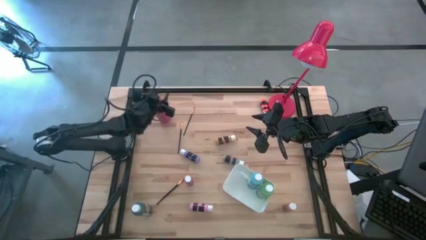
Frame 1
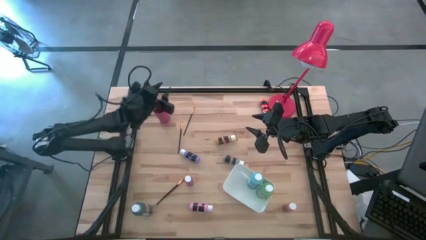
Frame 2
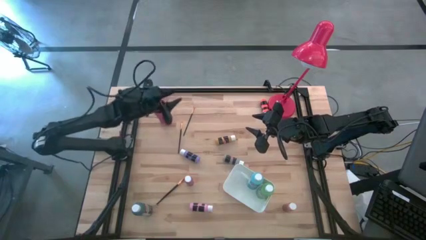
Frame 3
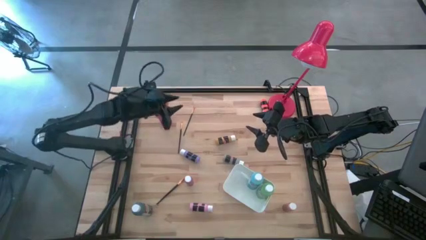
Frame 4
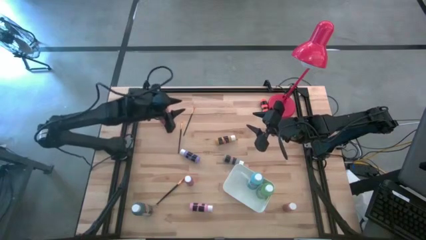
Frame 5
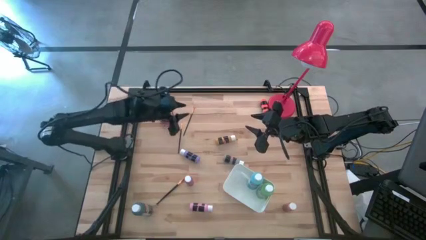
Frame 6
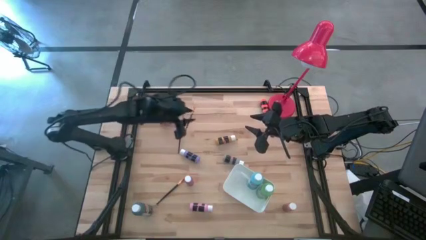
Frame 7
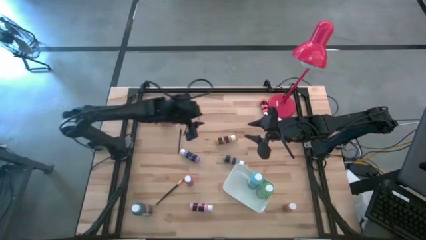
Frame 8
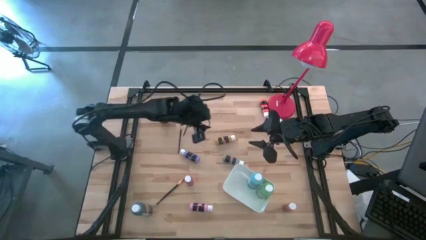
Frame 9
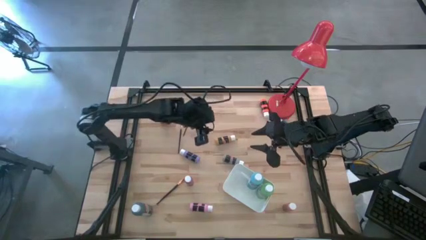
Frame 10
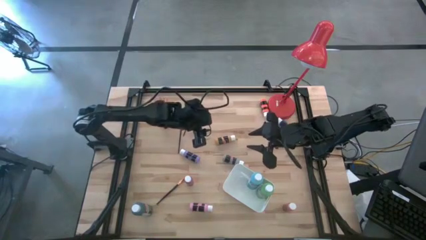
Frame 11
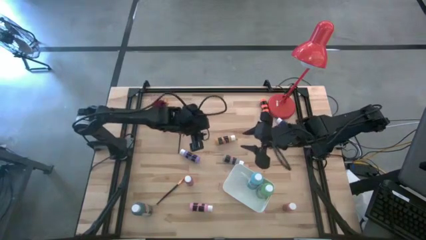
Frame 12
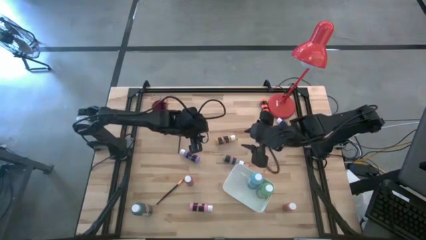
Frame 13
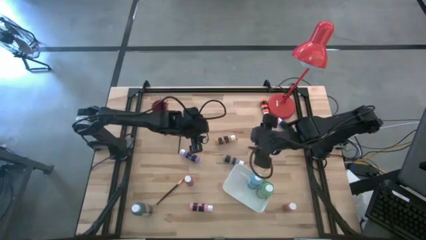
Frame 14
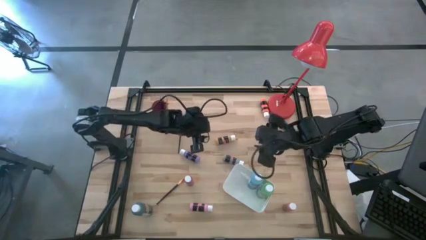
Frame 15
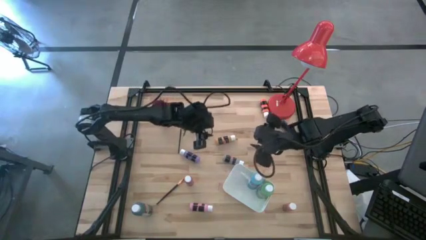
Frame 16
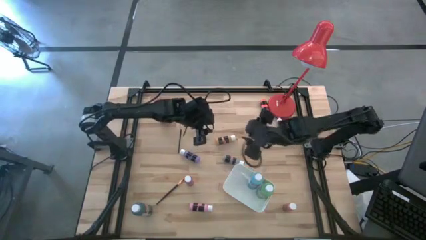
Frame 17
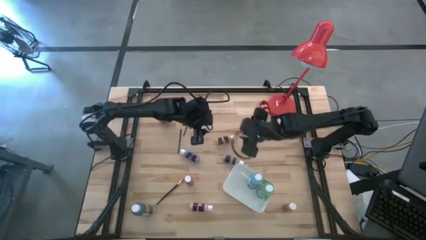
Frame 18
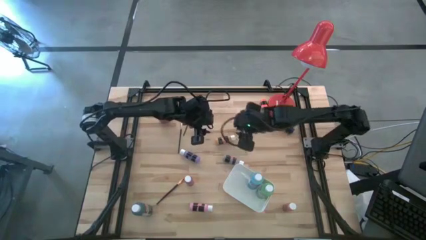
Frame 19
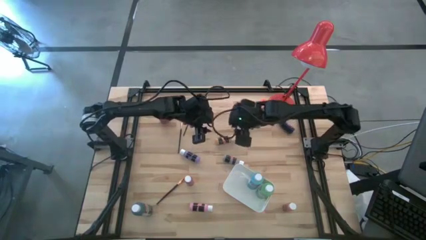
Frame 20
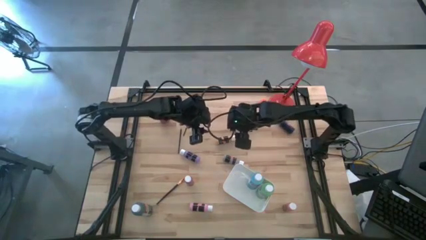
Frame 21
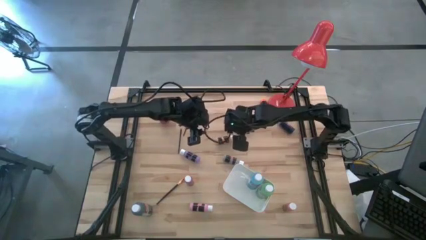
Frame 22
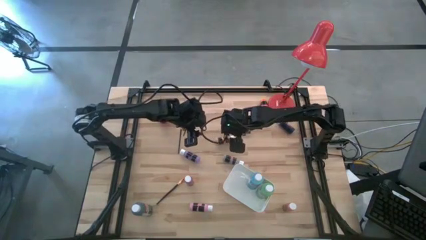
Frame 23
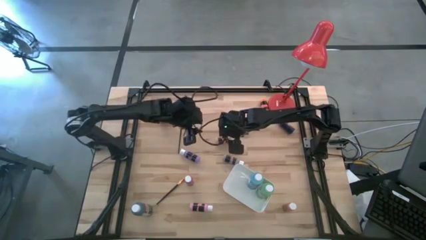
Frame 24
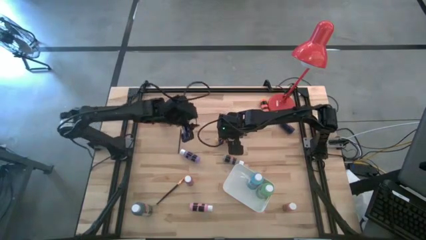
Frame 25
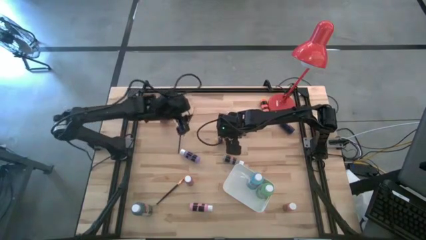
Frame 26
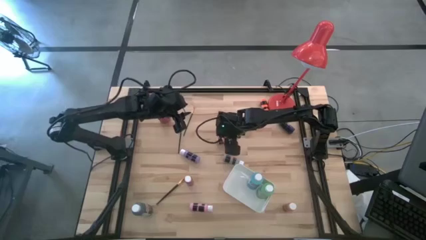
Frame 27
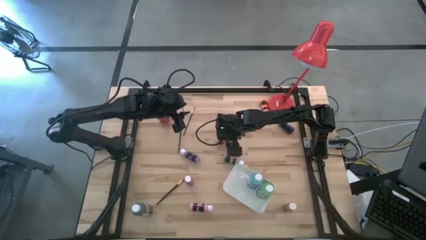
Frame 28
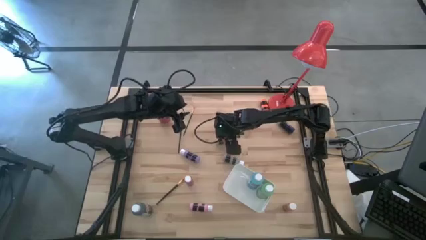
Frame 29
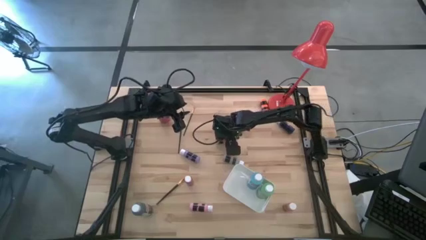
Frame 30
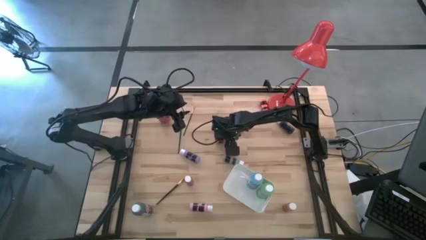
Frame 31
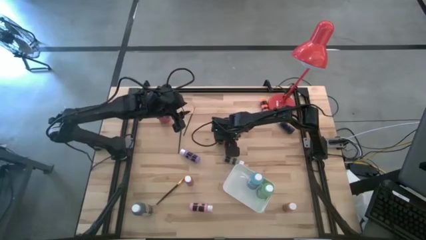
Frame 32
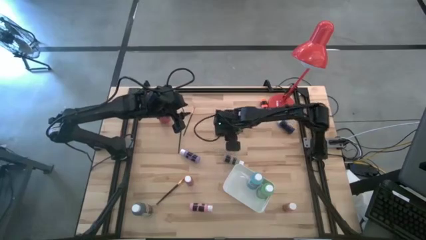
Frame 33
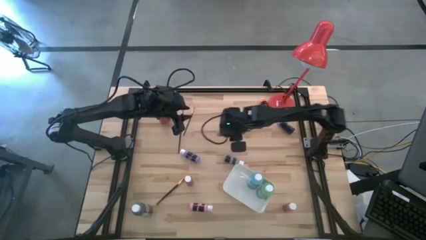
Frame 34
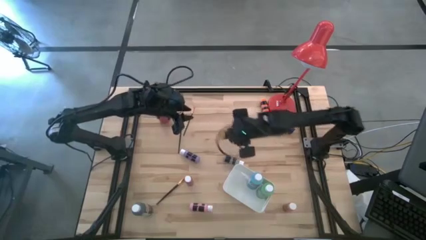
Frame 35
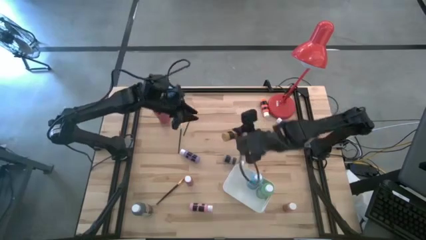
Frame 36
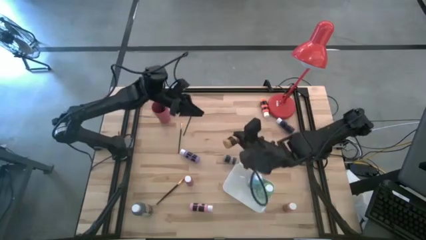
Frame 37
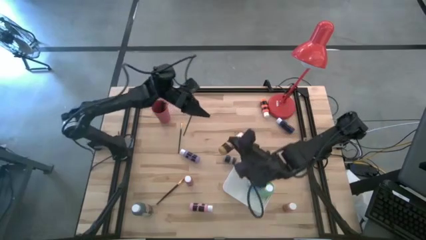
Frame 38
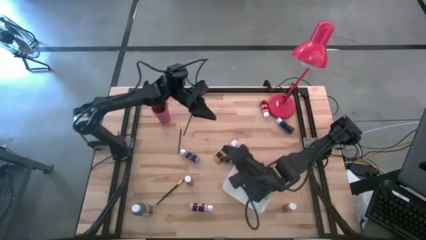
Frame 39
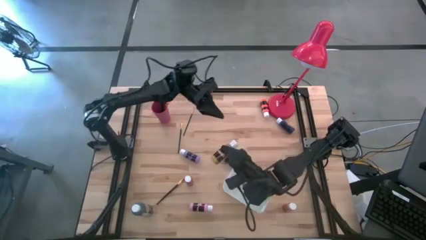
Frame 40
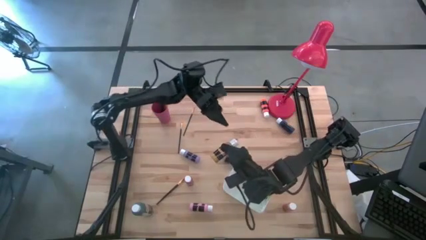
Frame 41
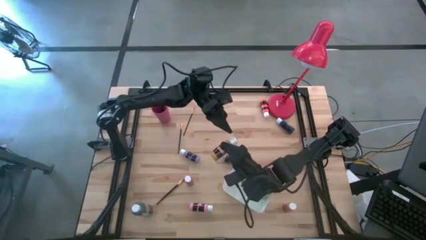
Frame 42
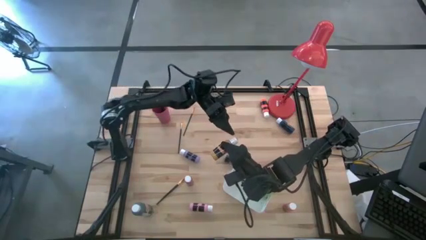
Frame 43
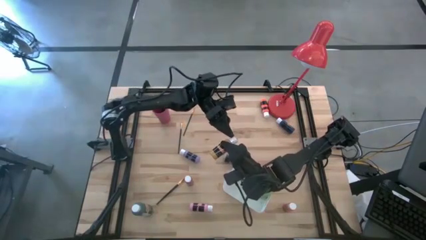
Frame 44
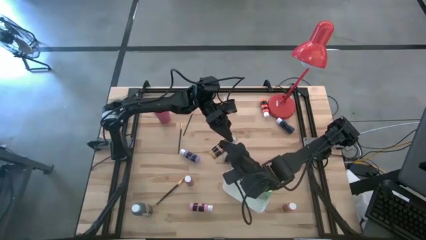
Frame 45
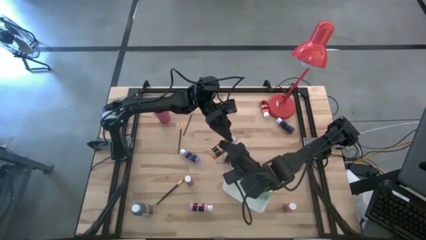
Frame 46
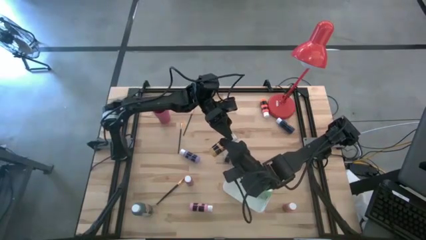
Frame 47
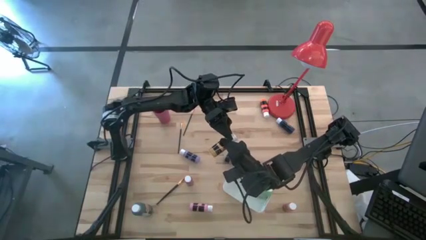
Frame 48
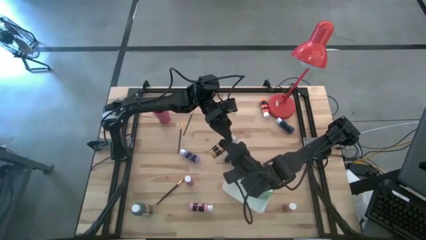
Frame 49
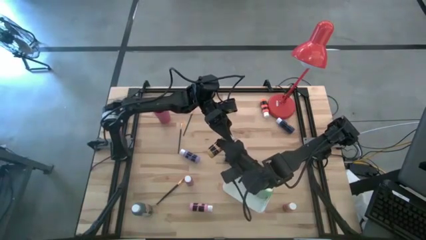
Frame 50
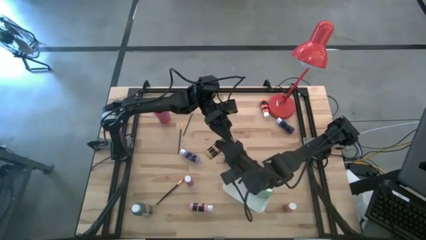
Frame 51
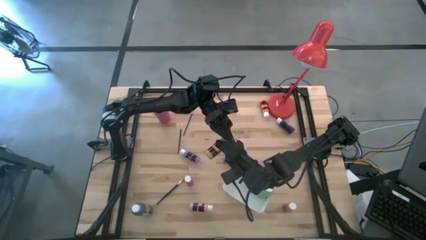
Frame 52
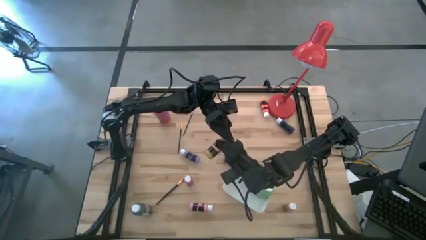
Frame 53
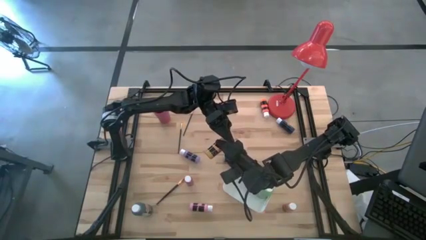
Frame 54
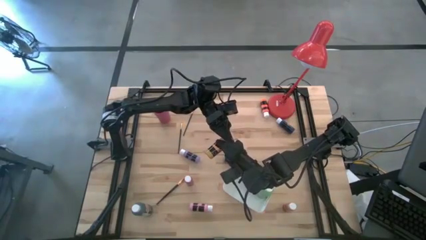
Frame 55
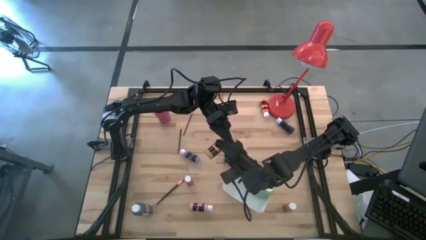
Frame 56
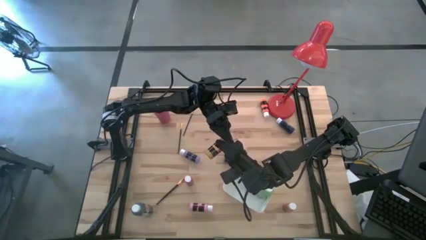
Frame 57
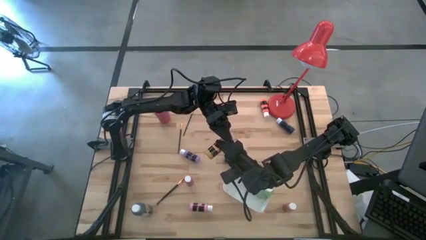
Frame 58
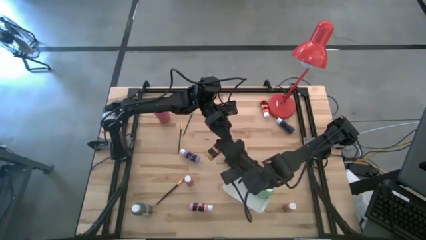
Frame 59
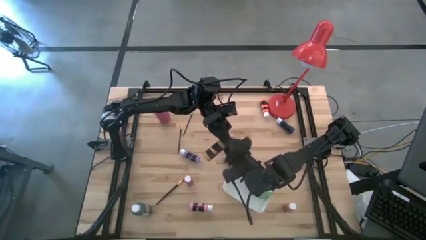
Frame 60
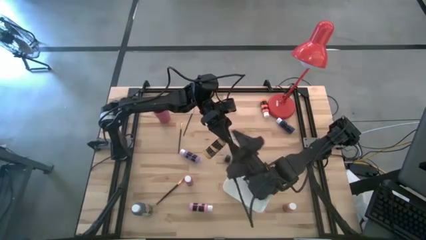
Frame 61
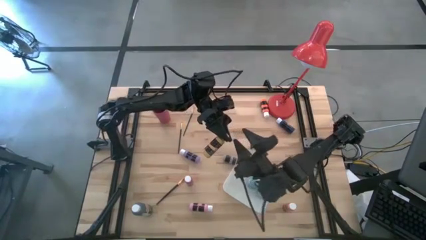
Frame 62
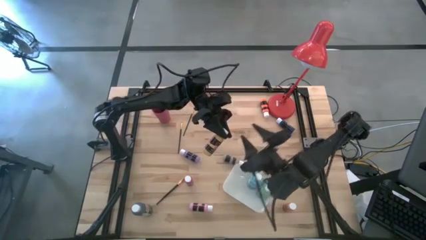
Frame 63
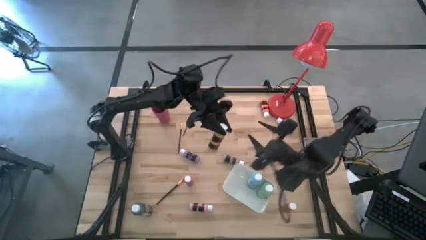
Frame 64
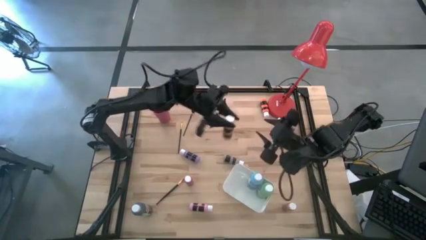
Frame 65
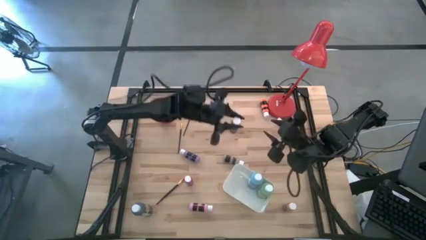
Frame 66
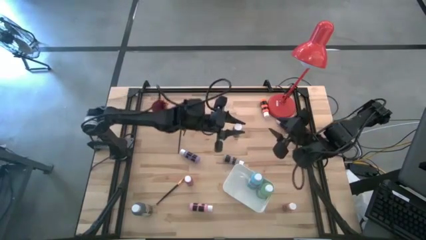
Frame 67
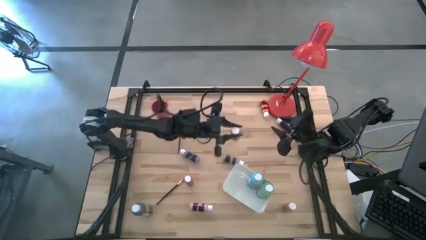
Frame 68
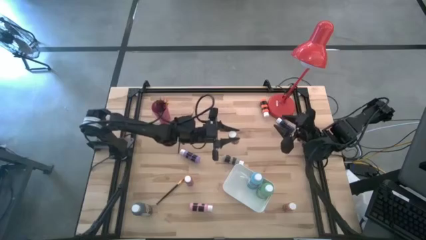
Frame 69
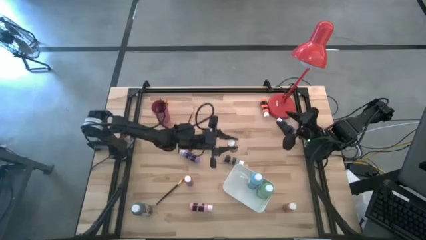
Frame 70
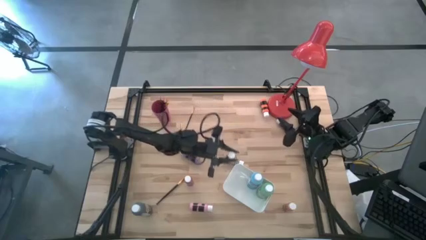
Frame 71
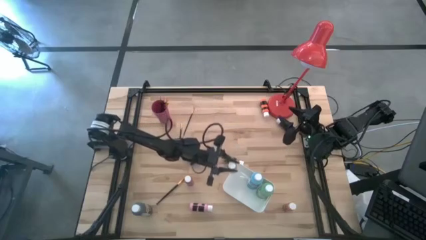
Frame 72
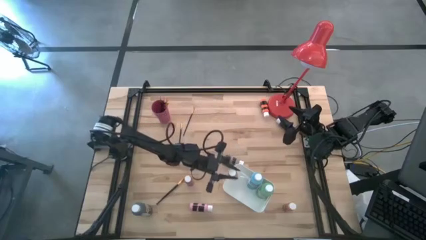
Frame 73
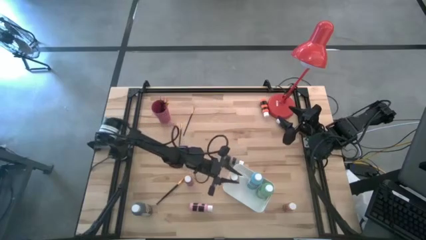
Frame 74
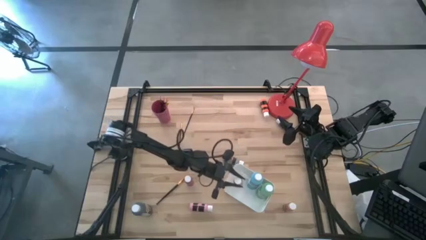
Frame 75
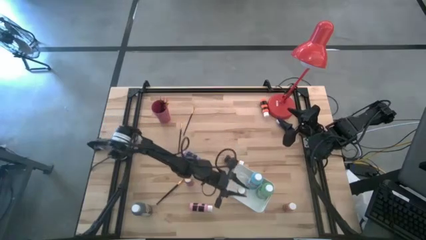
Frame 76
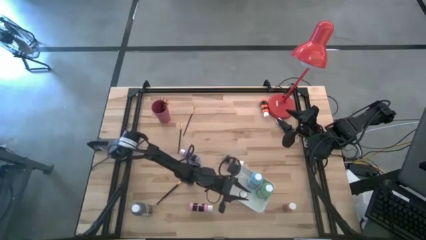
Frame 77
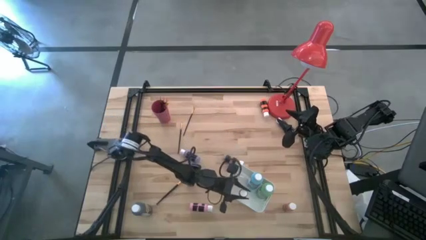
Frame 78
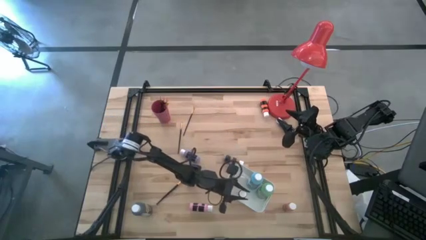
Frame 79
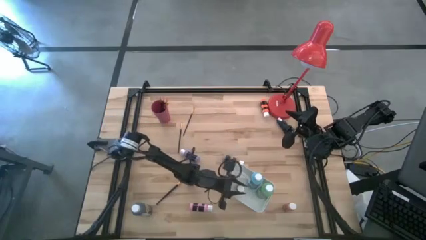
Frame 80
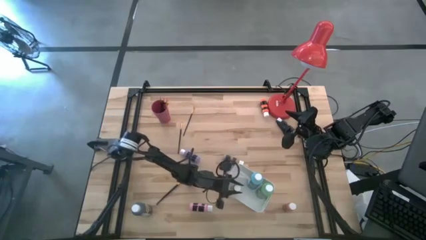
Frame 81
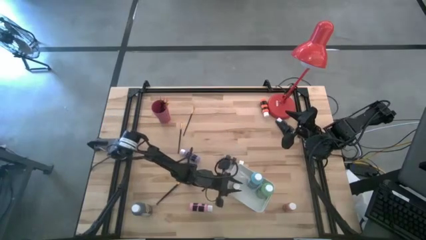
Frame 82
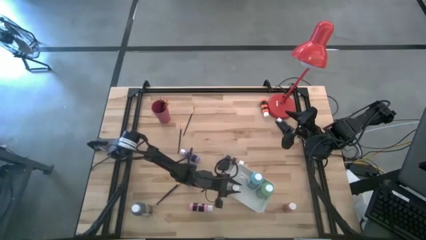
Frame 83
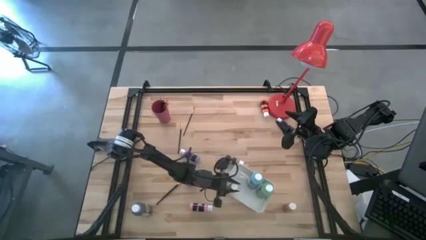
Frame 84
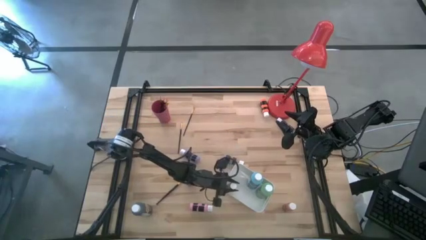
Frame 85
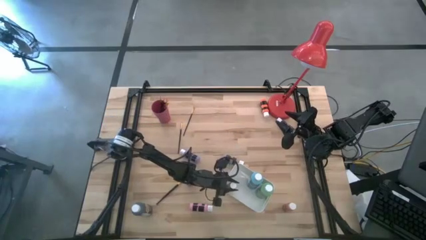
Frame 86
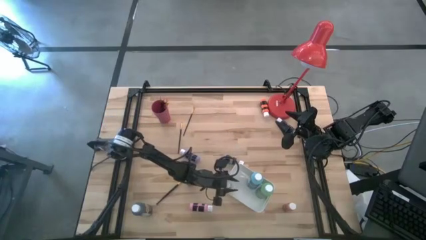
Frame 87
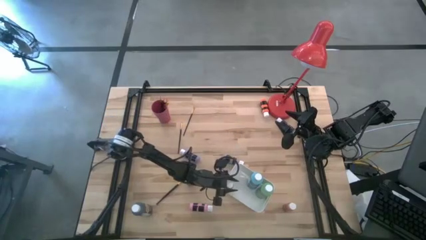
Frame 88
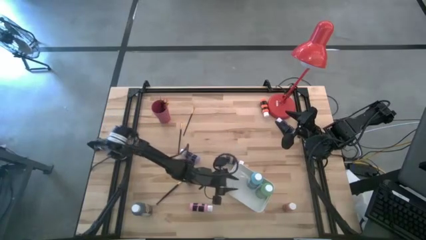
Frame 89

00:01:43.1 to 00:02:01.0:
Task: Pick & Place Paint Supplies
Put the orange paint bottle into the white bin
